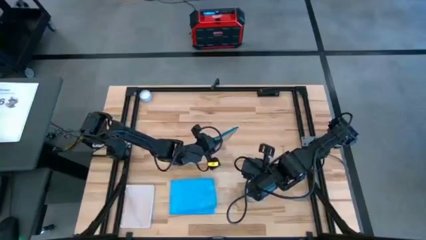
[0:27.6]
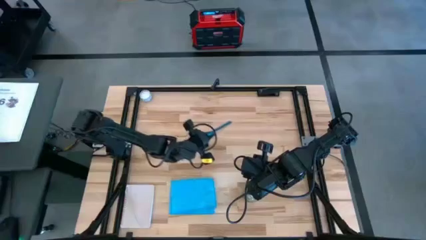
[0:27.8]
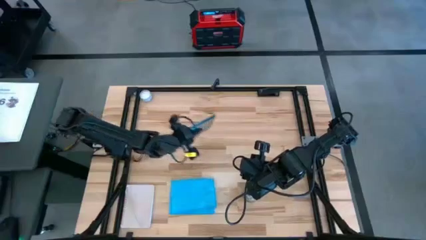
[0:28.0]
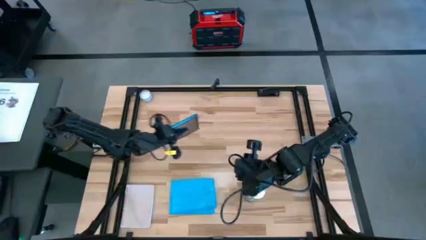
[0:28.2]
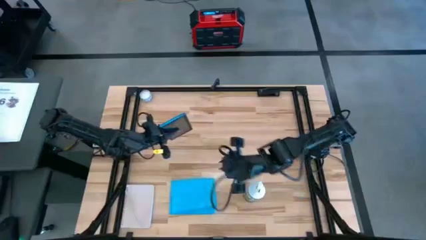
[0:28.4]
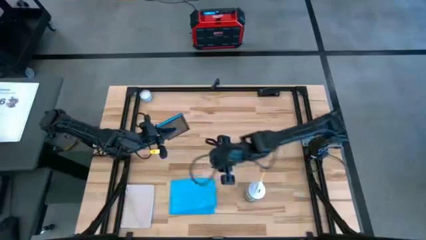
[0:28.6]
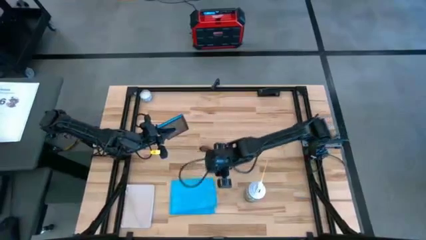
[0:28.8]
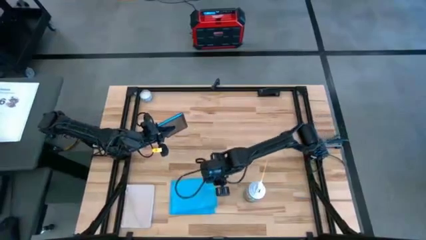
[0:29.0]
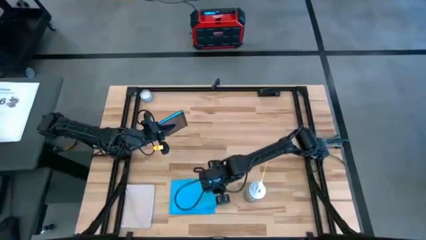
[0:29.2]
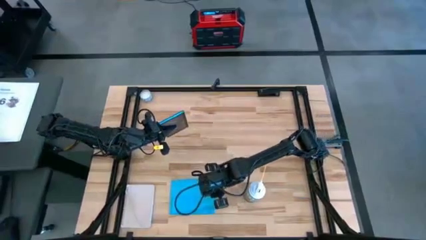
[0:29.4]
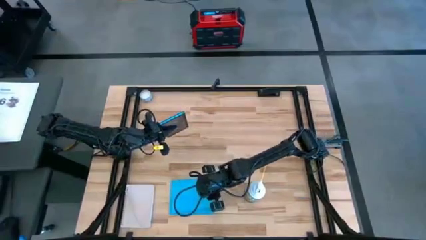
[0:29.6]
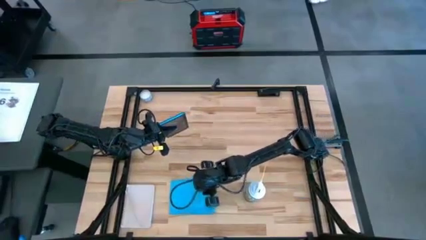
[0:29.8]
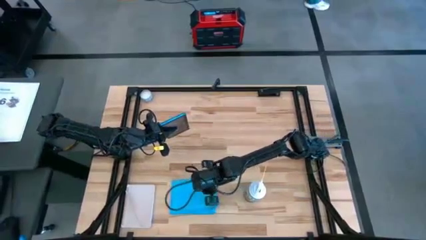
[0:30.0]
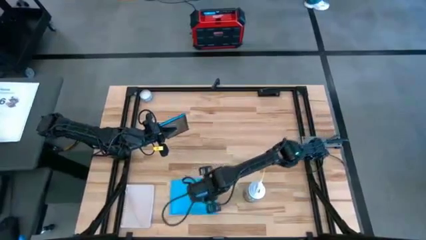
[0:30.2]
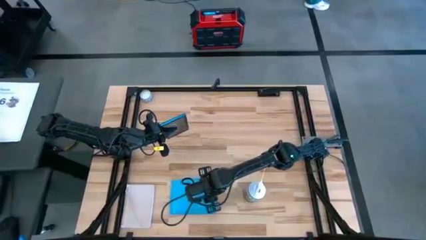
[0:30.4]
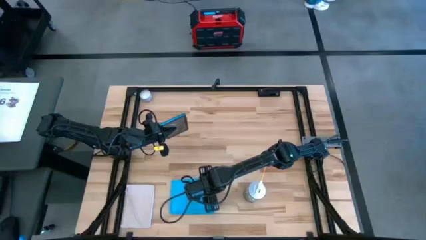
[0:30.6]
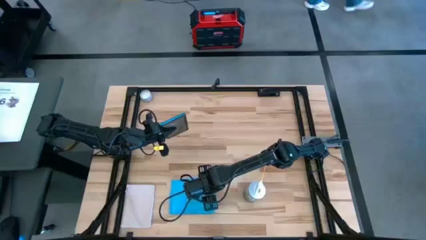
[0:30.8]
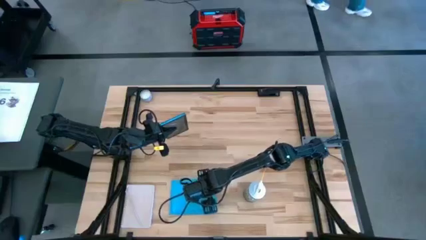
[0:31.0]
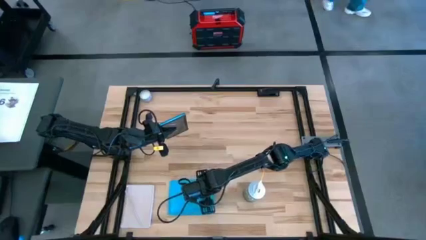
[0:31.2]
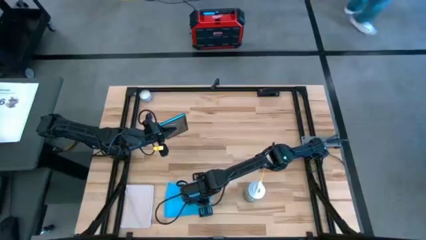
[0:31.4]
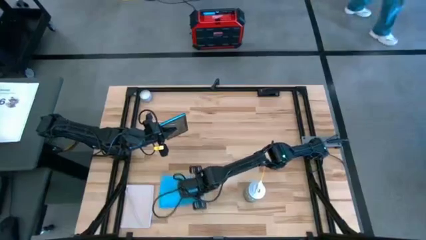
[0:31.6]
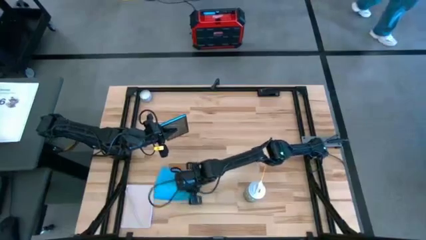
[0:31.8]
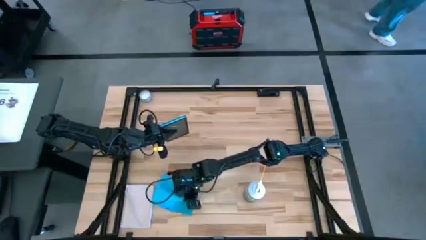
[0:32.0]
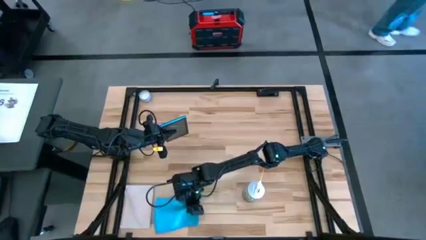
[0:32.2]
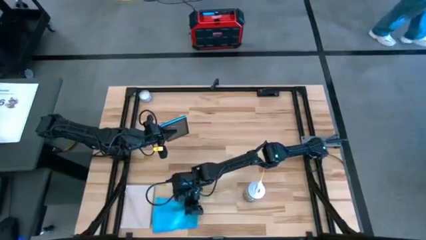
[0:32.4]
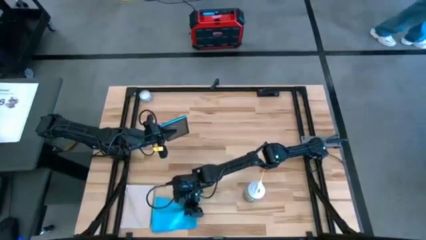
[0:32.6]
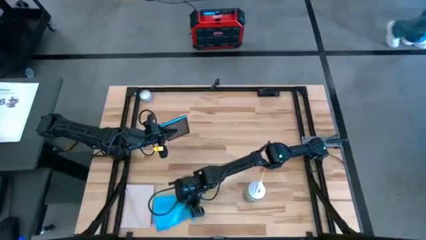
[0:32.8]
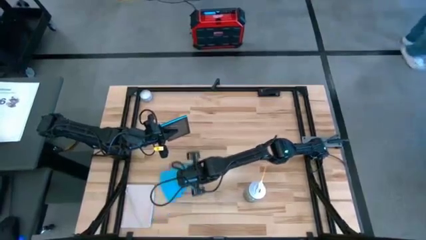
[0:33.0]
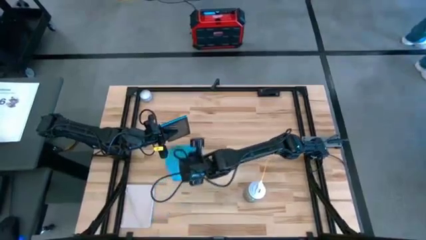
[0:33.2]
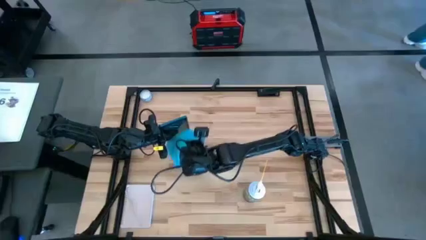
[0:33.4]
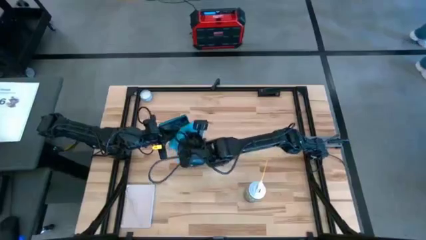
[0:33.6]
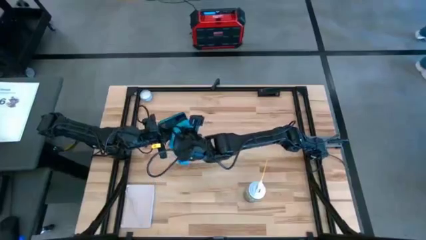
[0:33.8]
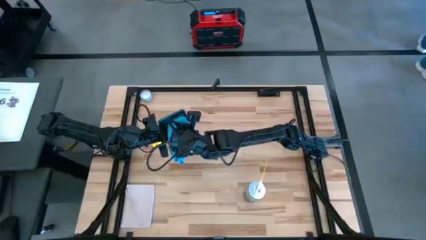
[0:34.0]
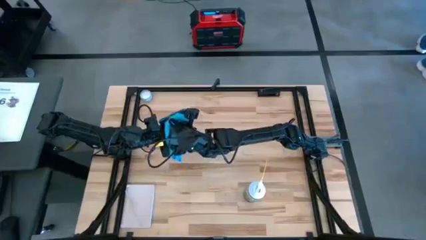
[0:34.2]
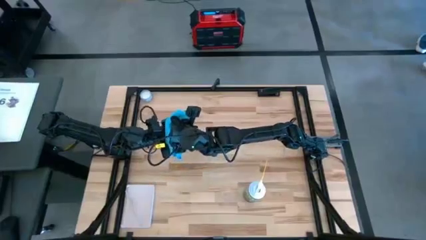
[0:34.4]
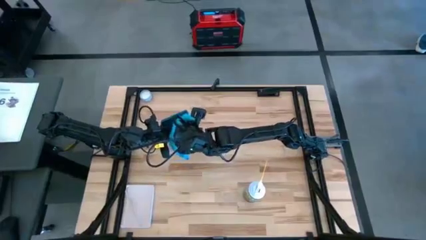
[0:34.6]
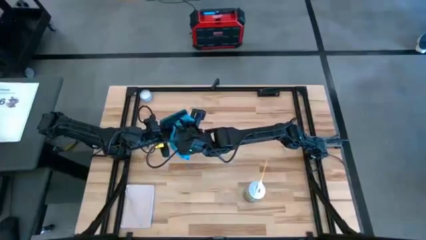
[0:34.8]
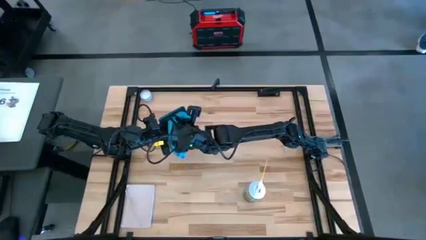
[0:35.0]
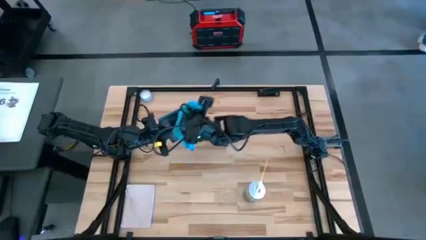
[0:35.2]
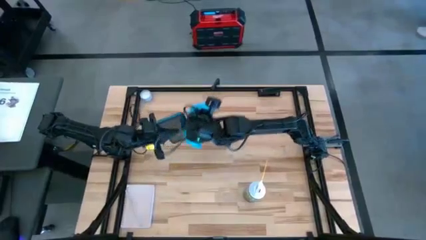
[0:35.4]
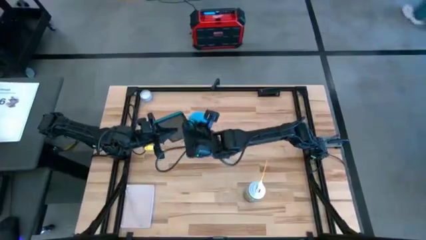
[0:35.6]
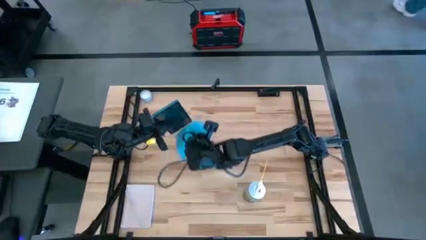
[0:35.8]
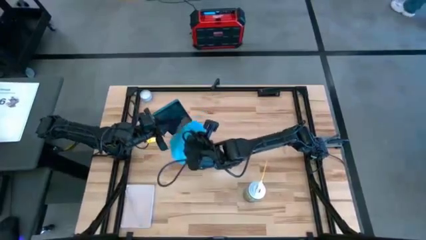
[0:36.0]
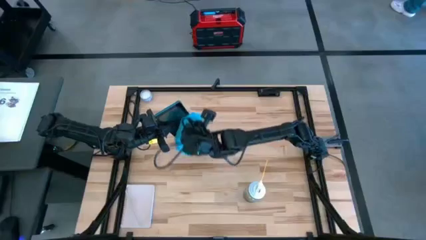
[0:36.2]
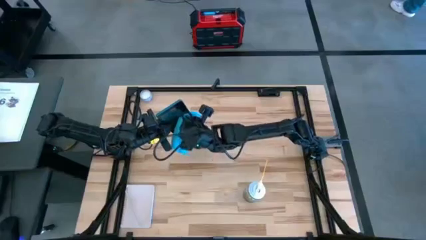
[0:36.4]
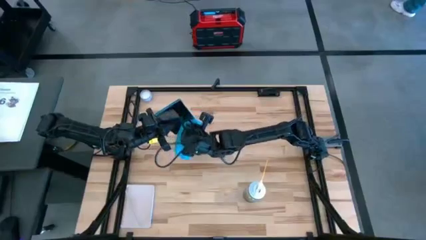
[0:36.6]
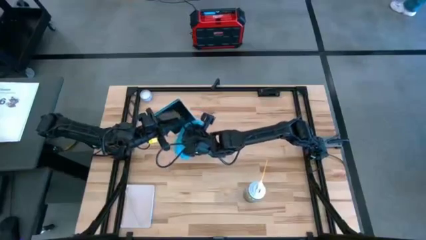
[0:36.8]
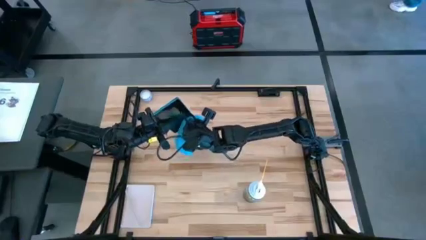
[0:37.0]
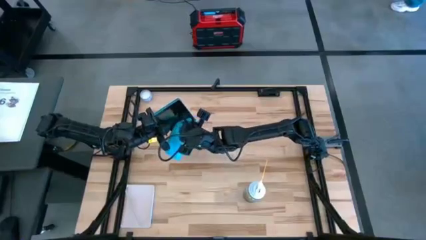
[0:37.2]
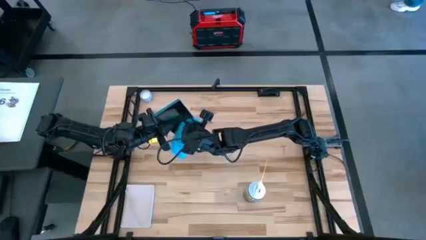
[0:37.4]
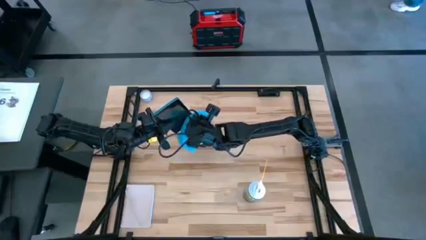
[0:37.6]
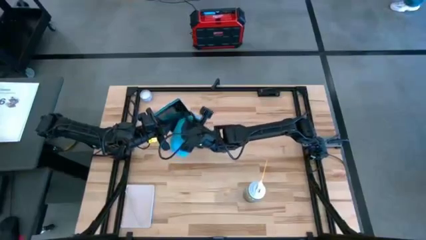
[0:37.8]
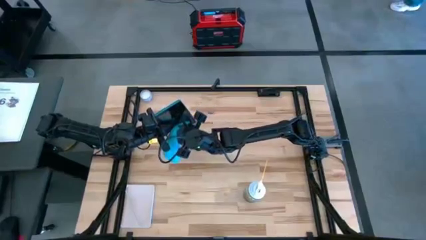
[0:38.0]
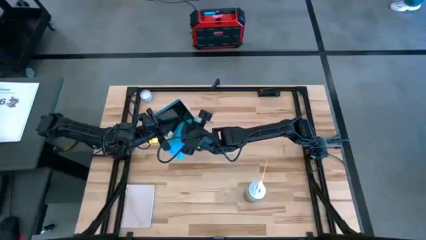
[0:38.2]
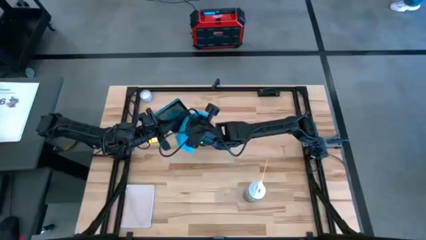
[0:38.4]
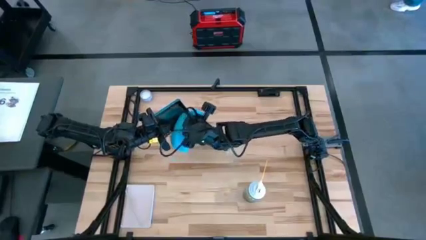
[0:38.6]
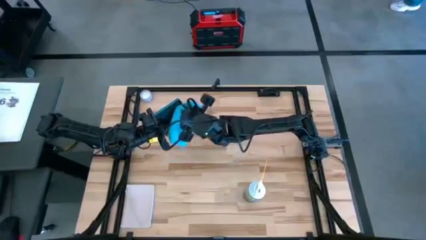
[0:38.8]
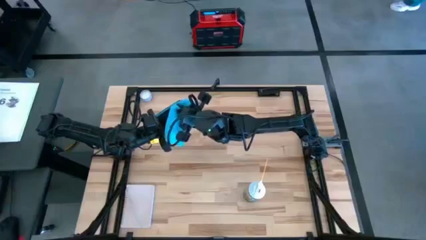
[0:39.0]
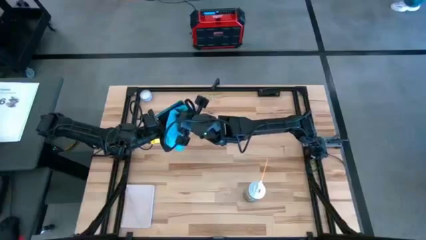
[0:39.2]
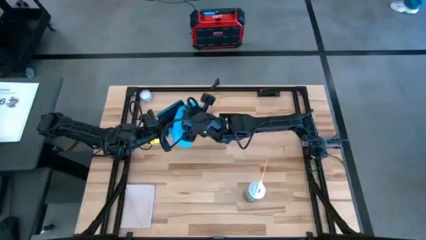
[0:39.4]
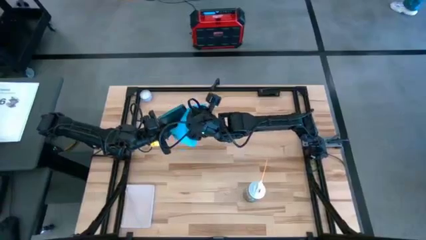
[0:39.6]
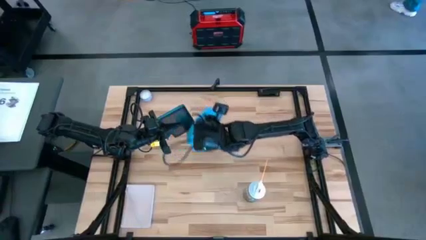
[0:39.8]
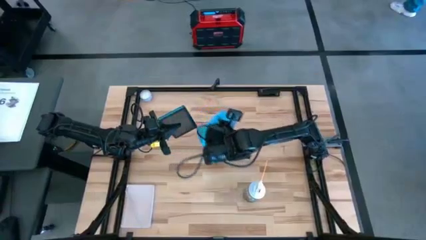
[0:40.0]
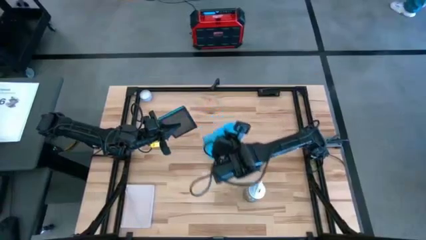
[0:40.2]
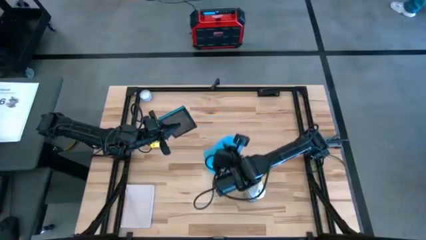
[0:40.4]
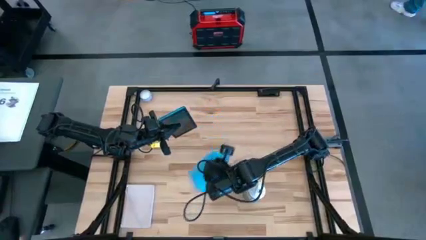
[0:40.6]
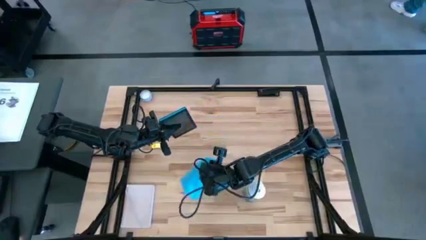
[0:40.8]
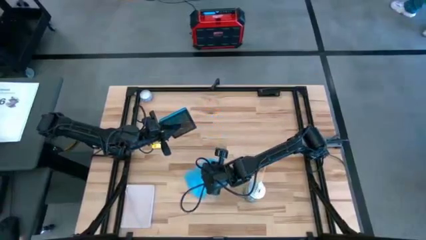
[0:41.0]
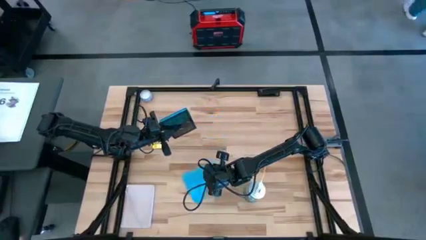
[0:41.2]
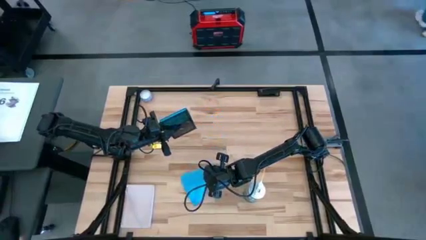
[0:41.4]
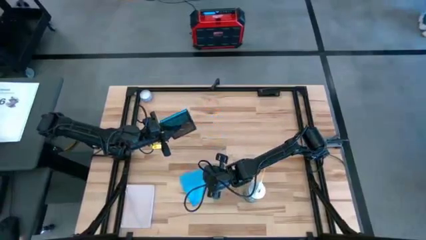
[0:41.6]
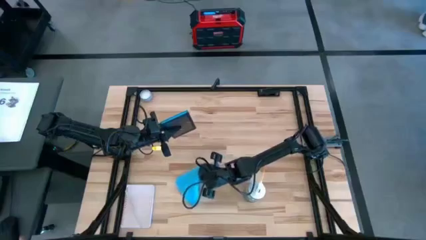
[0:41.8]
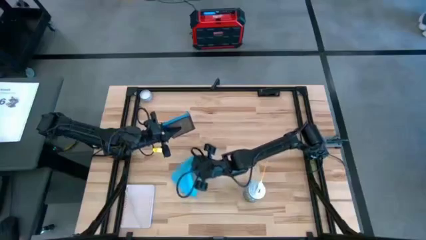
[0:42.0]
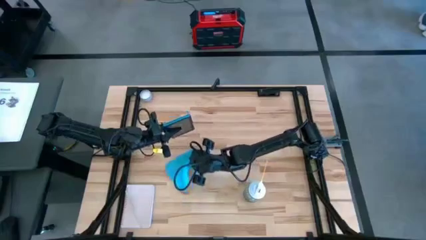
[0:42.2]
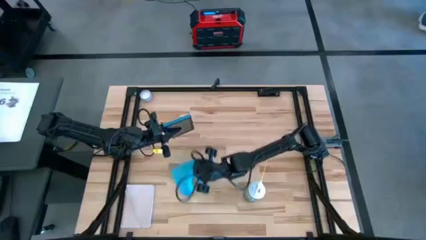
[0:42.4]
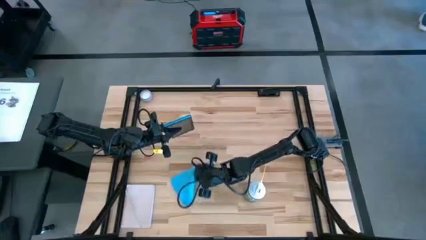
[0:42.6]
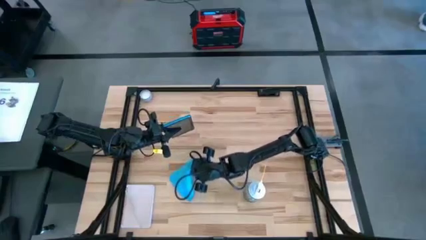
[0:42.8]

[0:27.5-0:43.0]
Task: Apply microfiber cloth
Wipe the front of the blue tablet with the blue microfiber cloth
